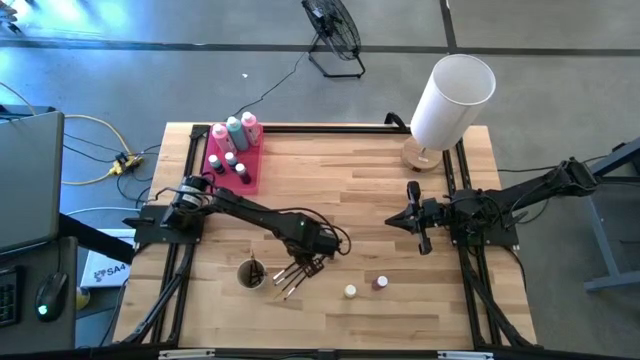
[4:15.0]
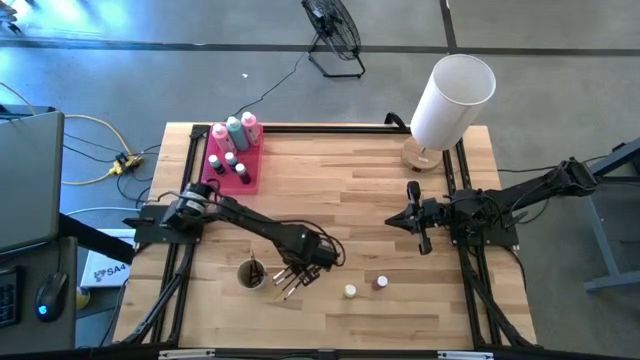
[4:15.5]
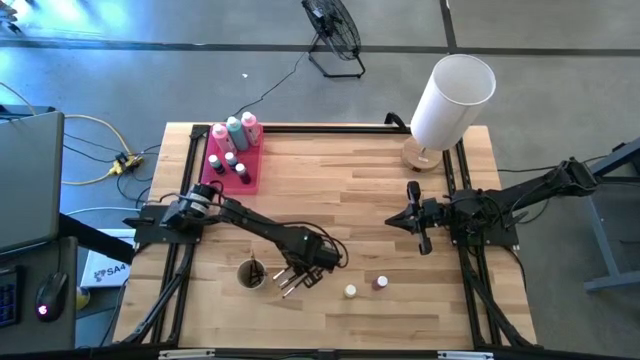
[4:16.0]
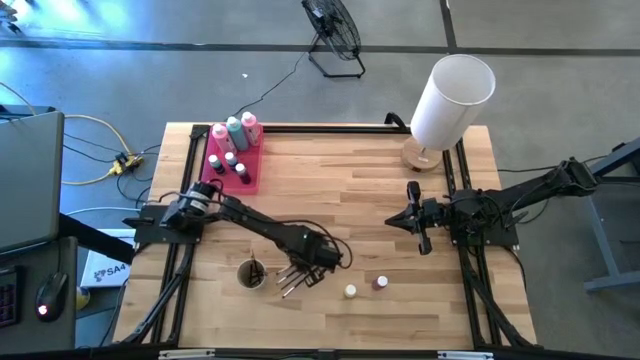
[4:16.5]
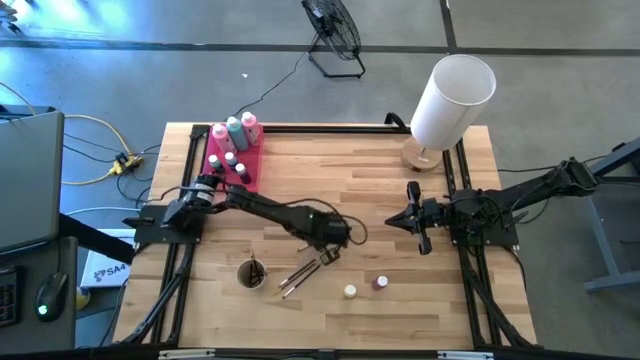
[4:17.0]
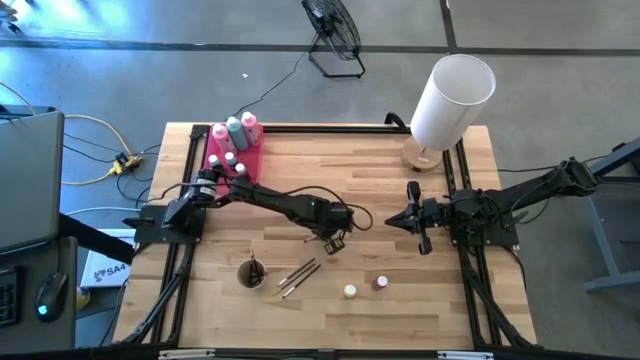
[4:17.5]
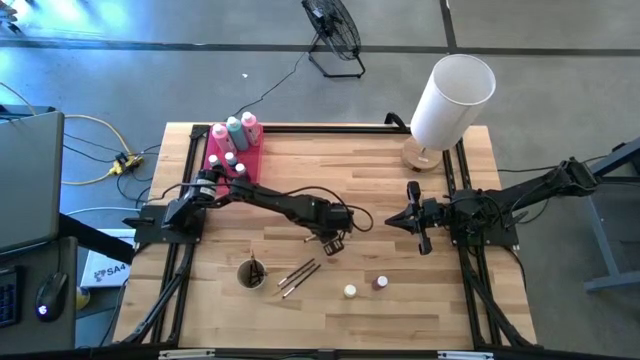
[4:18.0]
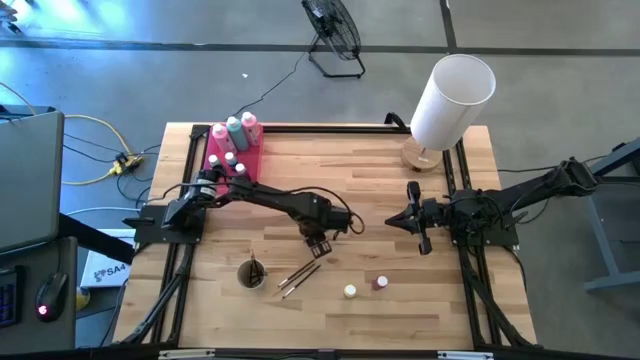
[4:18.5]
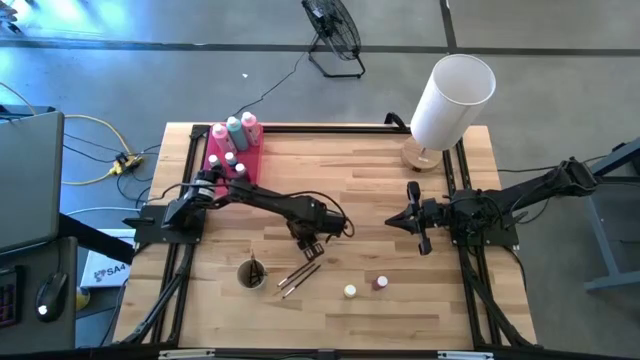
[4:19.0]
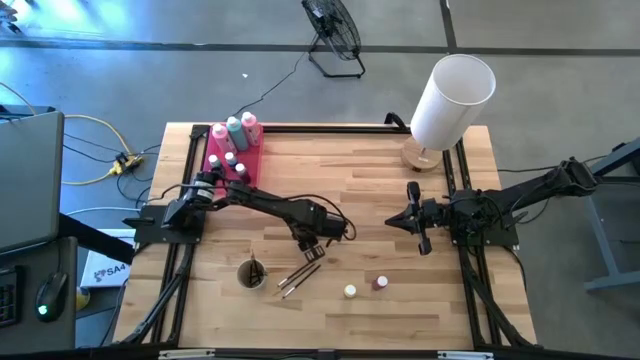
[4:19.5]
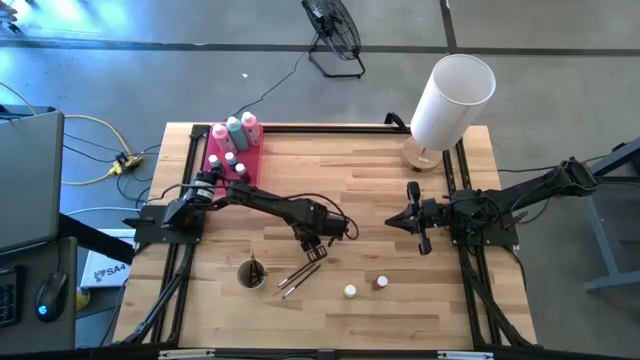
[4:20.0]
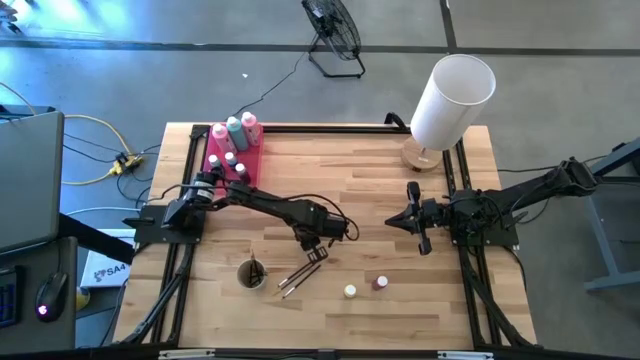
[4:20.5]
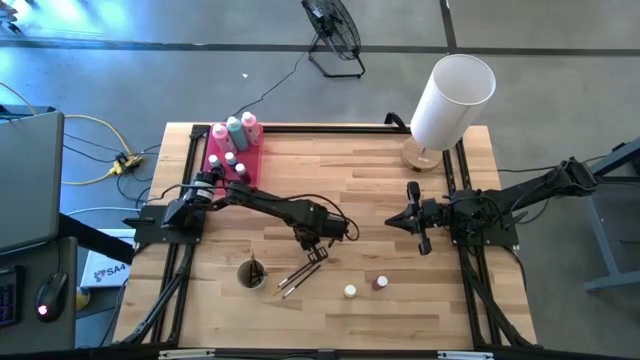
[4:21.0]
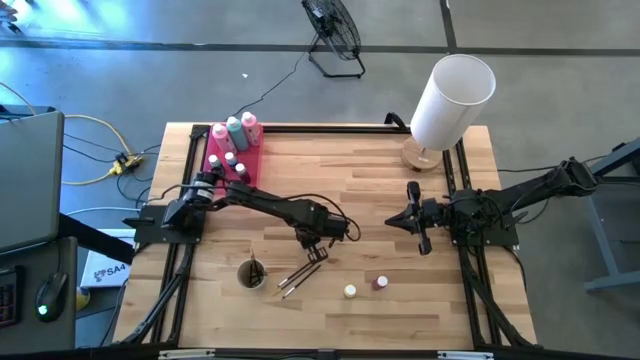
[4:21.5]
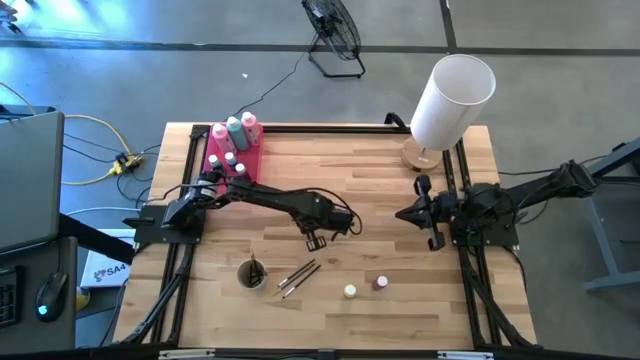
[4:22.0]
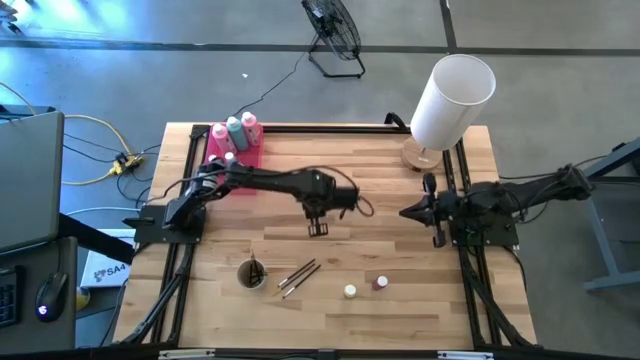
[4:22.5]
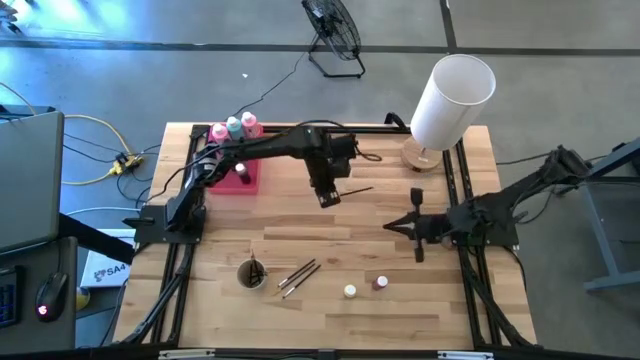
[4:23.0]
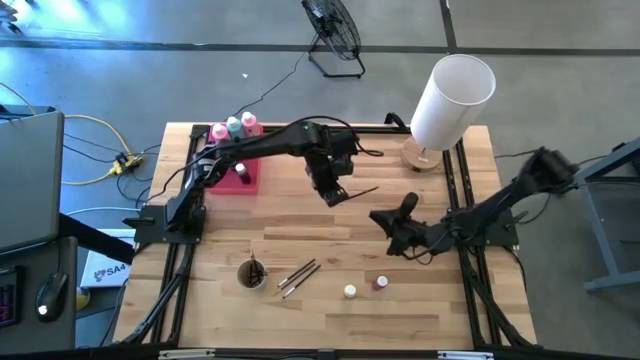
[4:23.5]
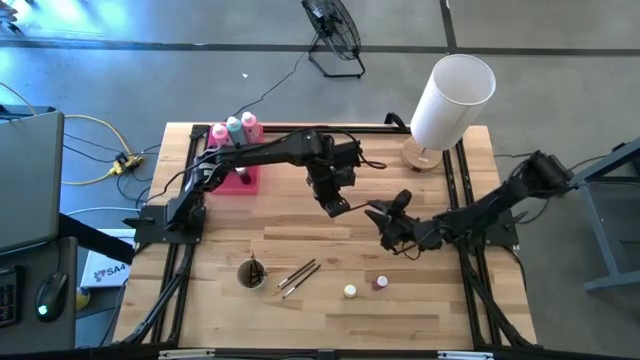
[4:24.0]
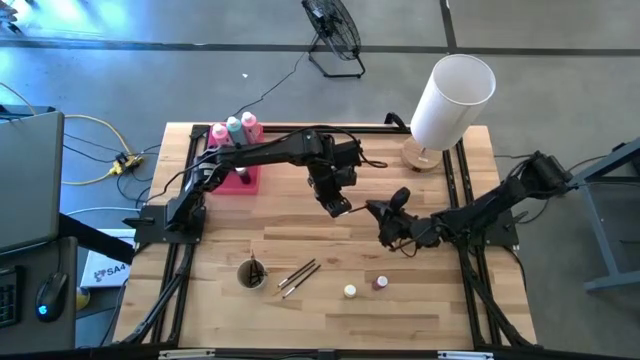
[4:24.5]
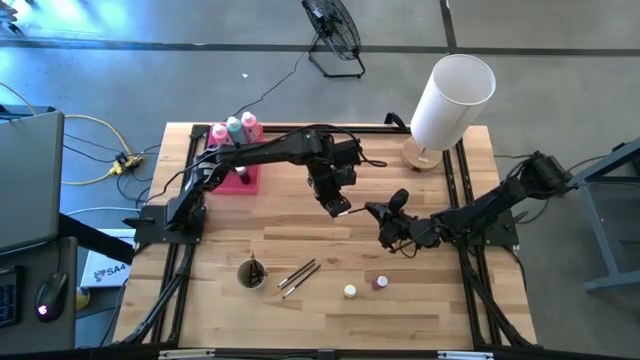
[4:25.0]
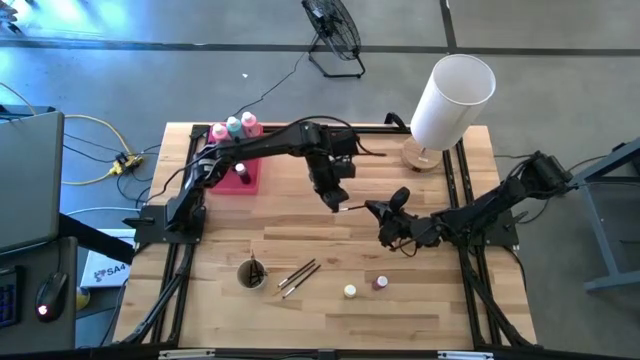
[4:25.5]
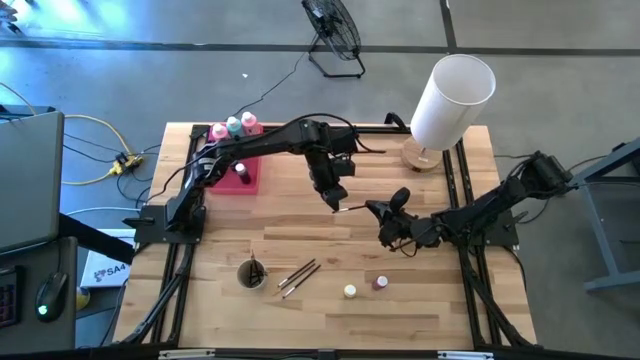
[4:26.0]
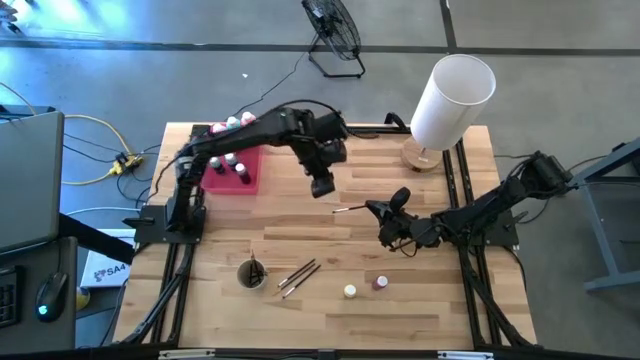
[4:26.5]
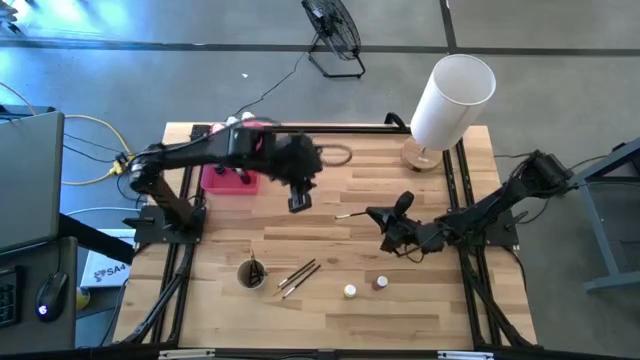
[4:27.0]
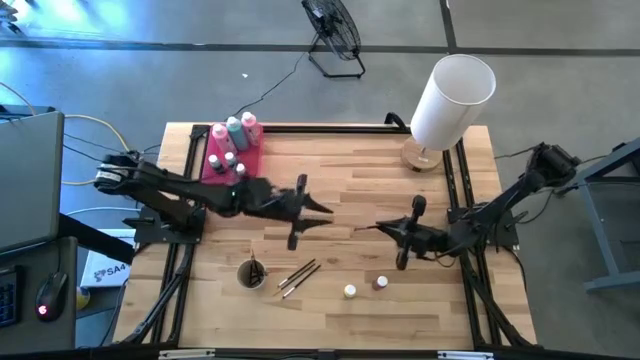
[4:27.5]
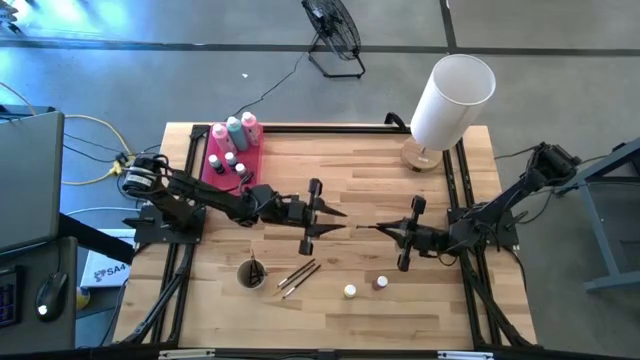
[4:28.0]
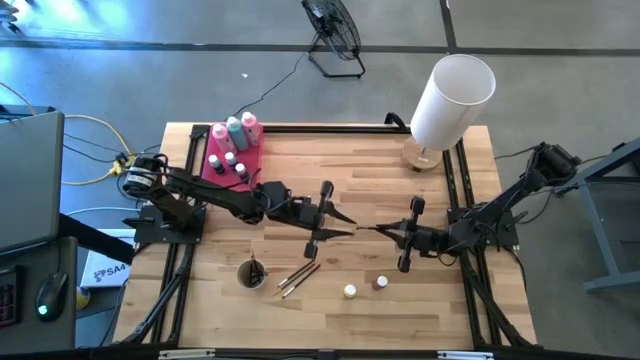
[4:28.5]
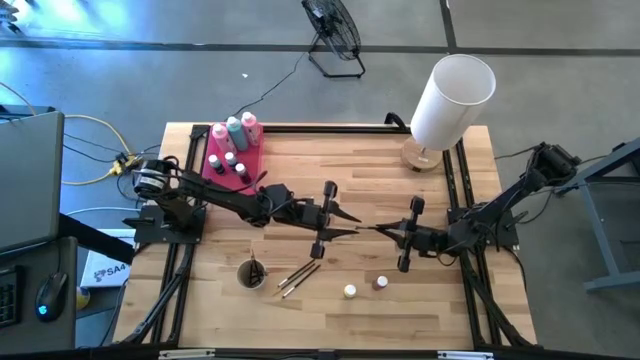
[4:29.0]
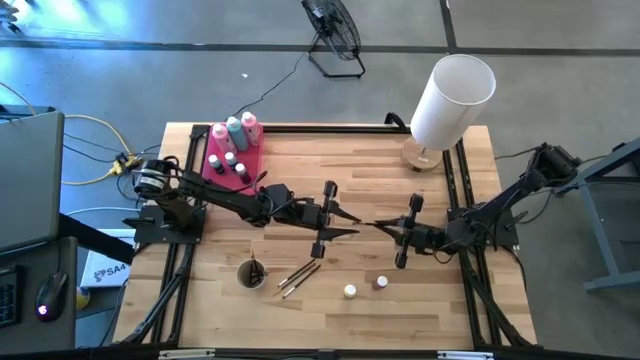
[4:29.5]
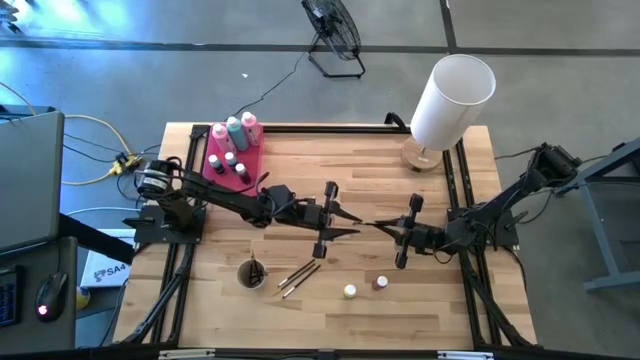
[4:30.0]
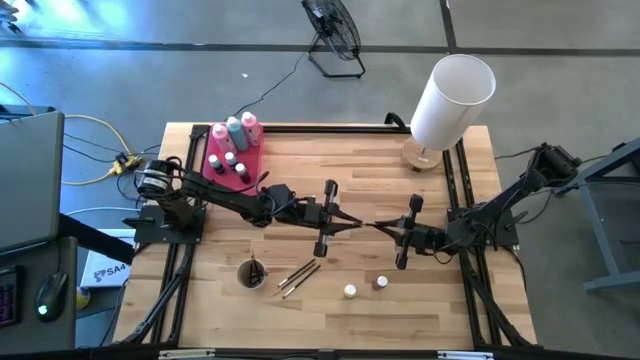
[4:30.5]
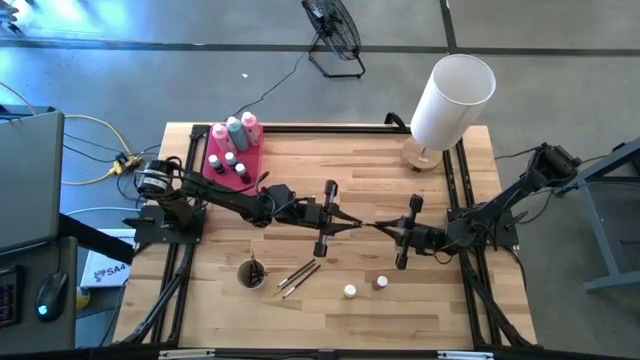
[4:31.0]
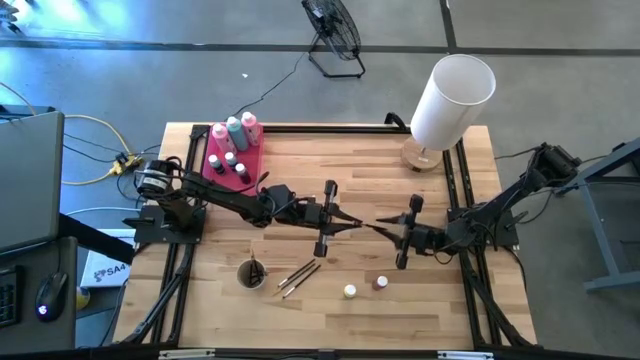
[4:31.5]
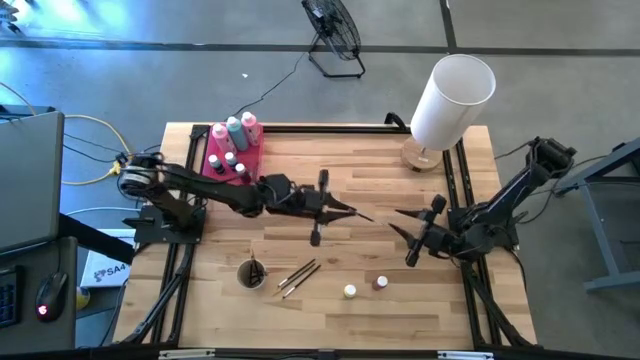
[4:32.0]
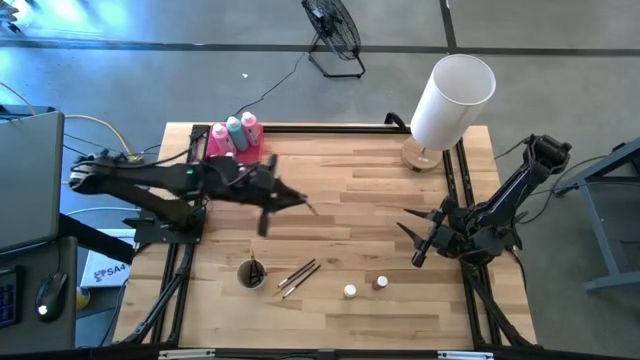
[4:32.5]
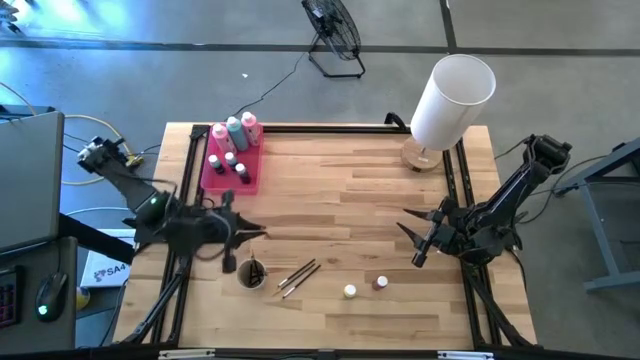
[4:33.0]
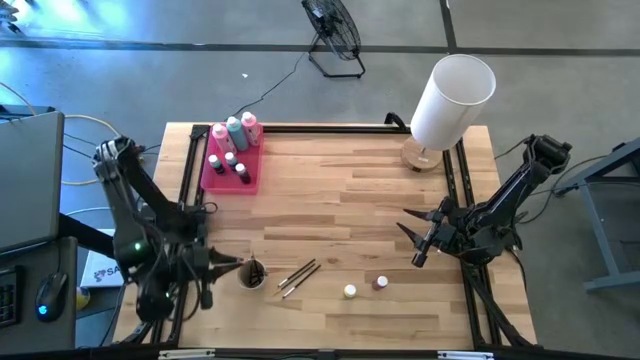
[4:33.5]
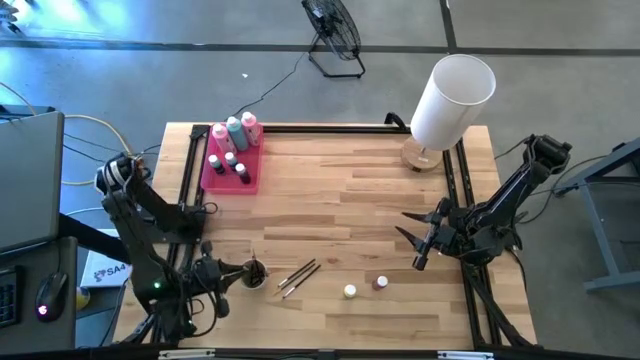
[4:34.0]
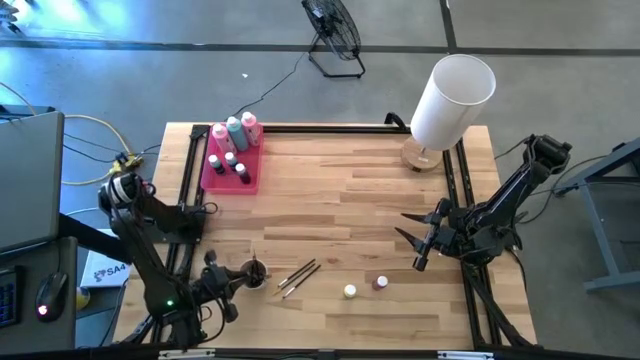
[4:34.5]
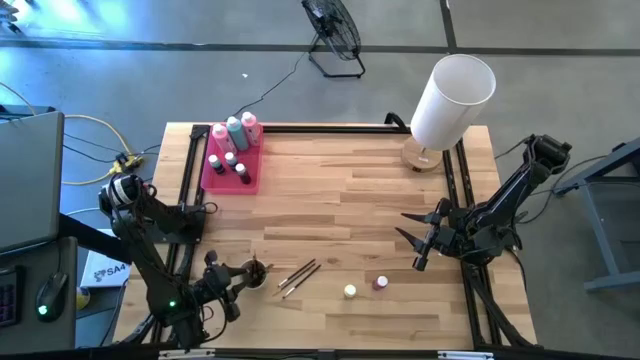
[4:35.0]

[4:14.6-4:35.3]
Task: Pick & Place Paint Supplies
Put the silver paintbrush into the light brown cup
